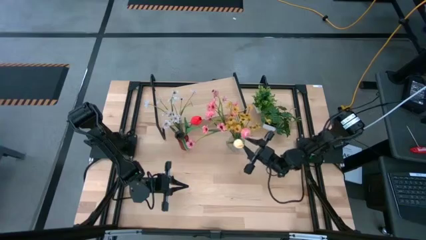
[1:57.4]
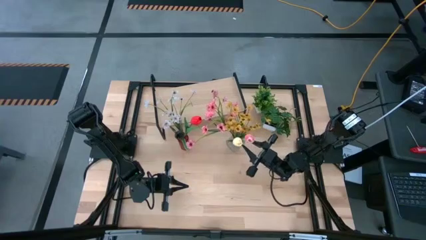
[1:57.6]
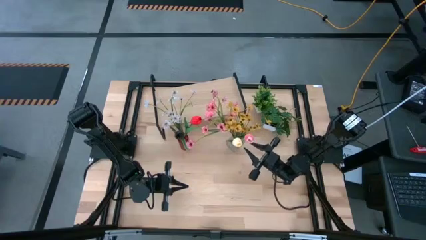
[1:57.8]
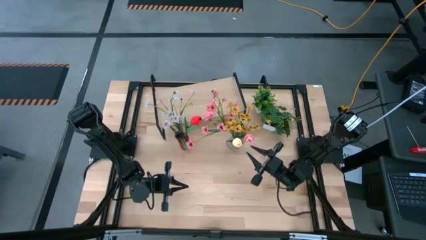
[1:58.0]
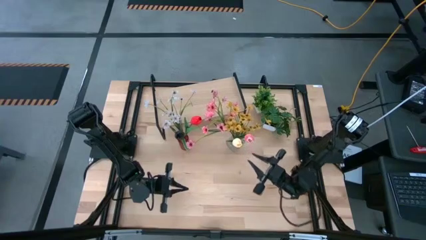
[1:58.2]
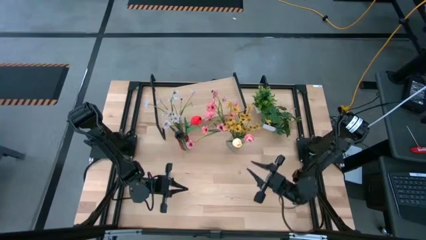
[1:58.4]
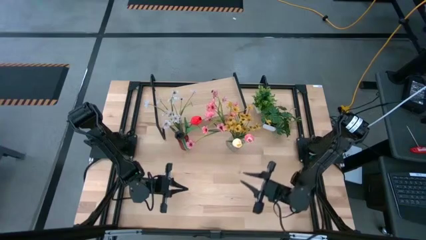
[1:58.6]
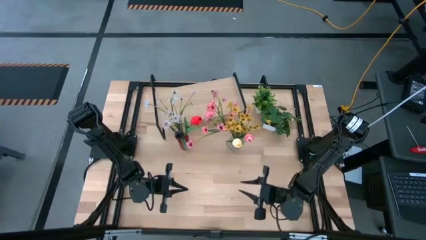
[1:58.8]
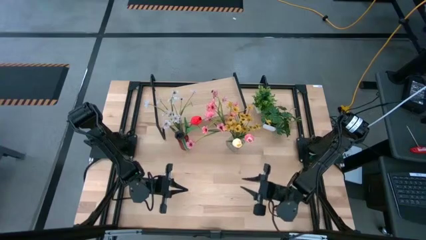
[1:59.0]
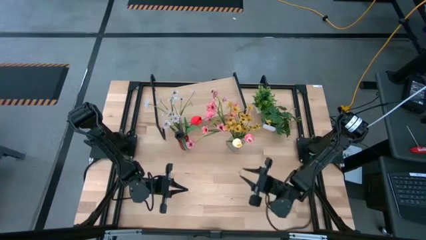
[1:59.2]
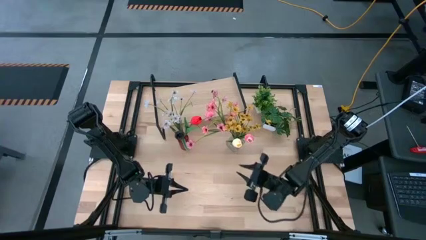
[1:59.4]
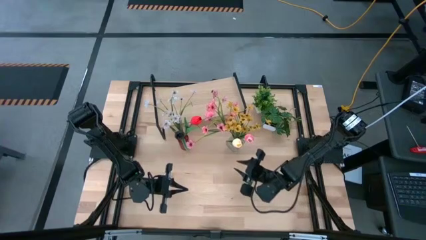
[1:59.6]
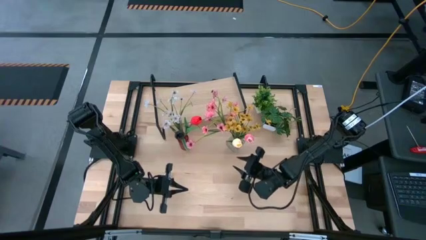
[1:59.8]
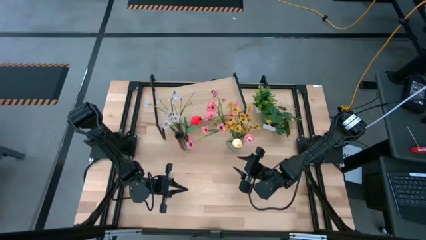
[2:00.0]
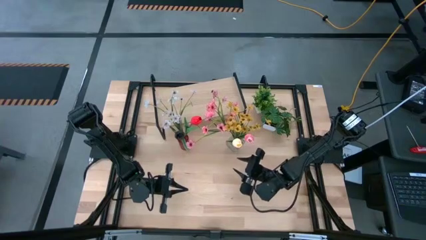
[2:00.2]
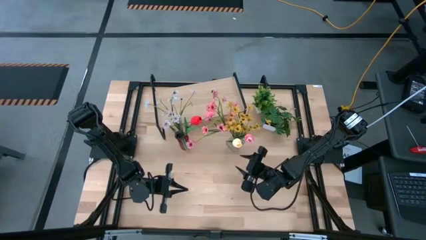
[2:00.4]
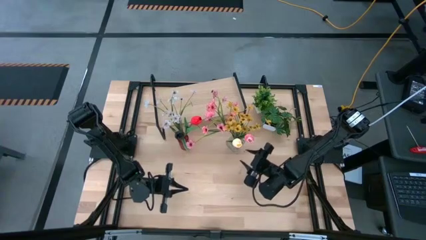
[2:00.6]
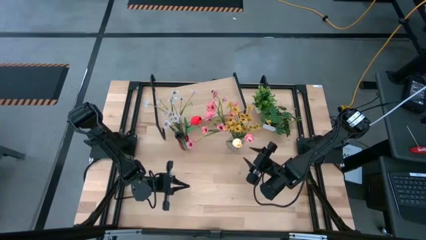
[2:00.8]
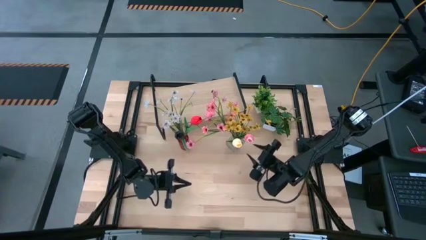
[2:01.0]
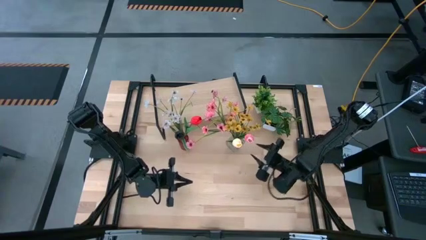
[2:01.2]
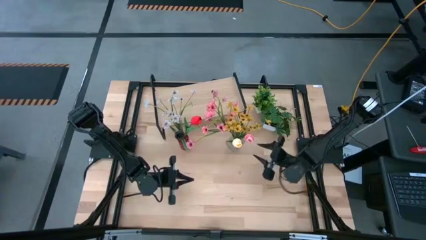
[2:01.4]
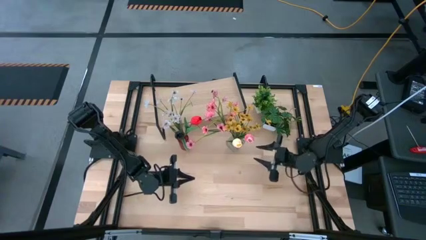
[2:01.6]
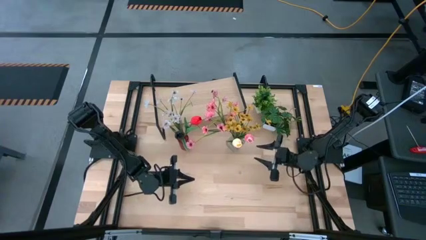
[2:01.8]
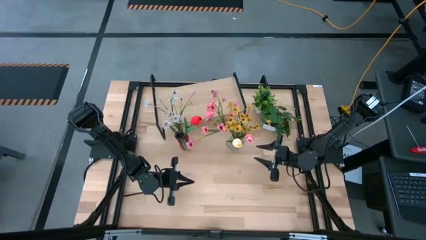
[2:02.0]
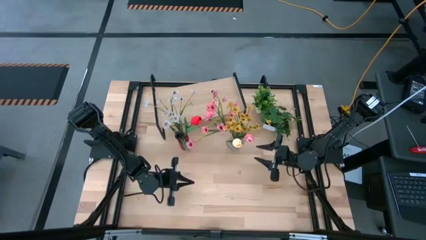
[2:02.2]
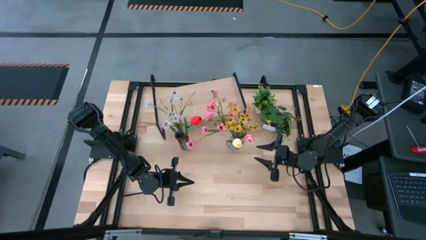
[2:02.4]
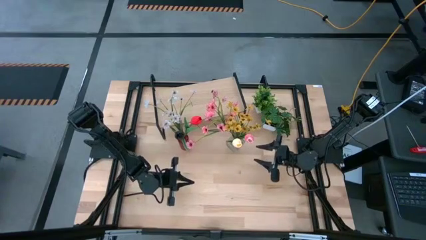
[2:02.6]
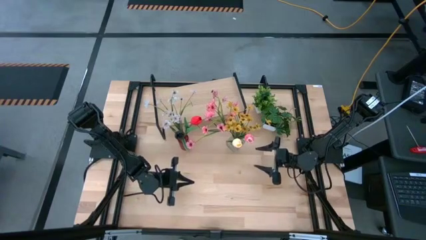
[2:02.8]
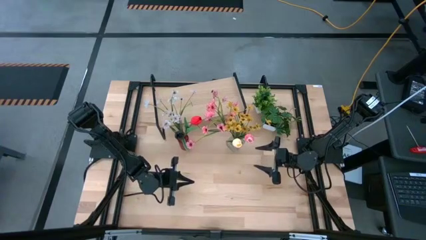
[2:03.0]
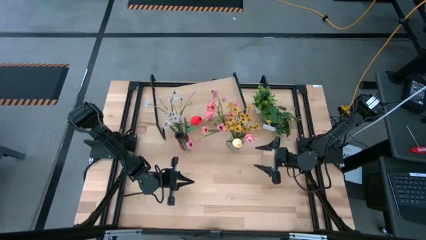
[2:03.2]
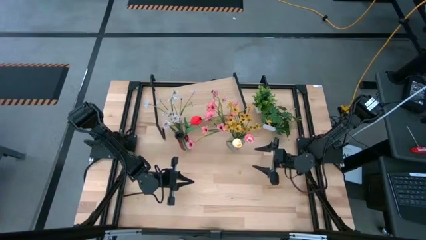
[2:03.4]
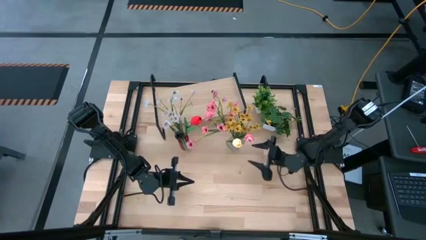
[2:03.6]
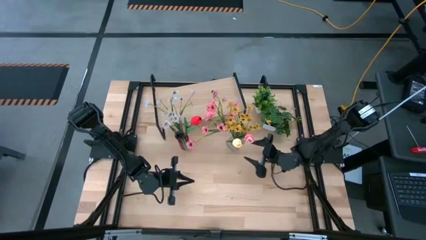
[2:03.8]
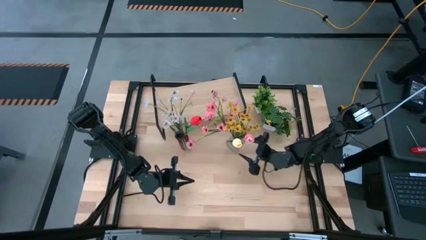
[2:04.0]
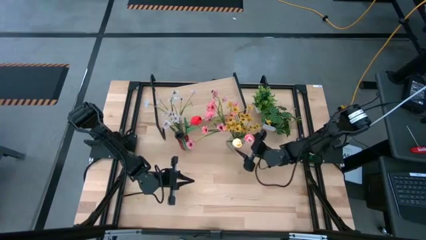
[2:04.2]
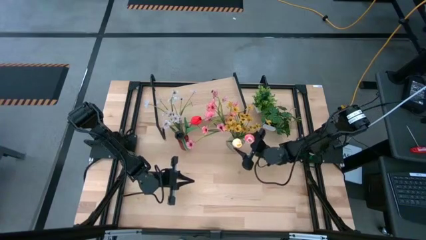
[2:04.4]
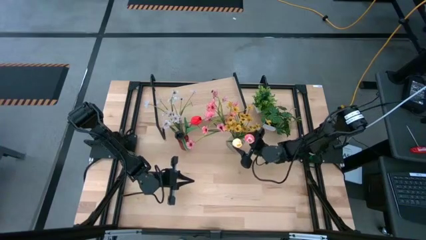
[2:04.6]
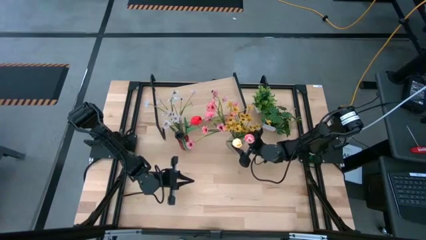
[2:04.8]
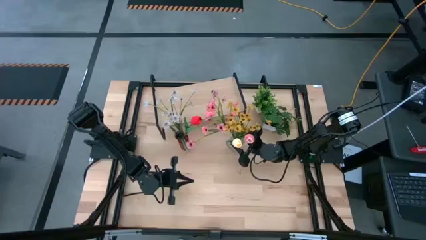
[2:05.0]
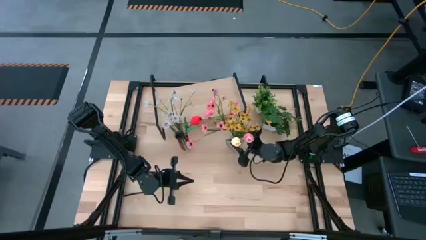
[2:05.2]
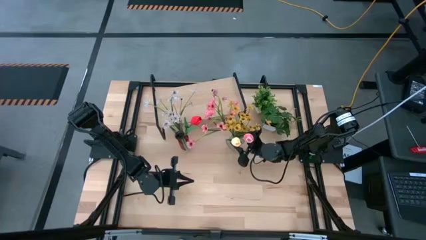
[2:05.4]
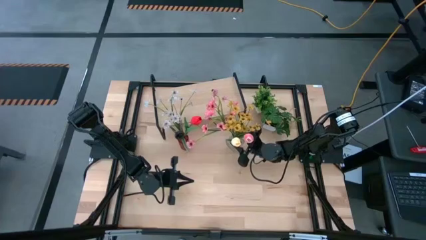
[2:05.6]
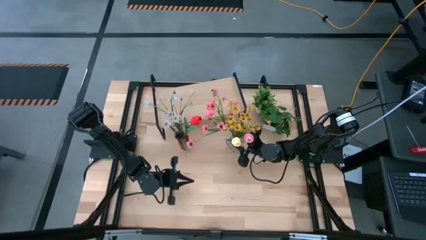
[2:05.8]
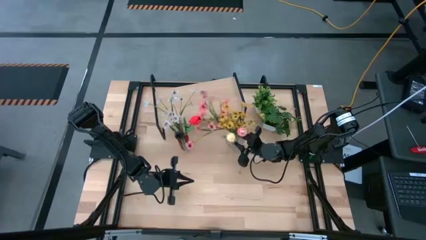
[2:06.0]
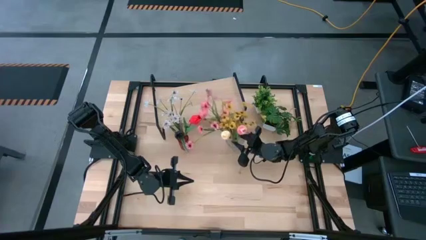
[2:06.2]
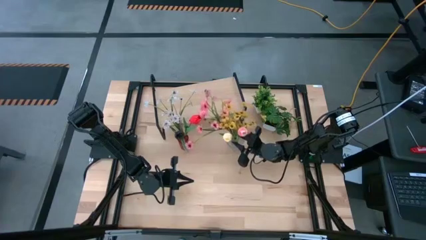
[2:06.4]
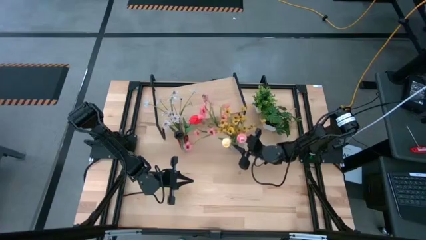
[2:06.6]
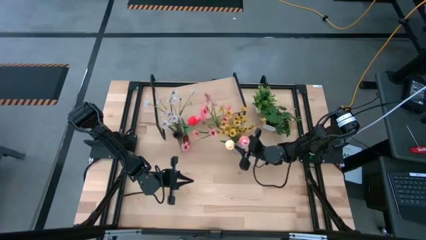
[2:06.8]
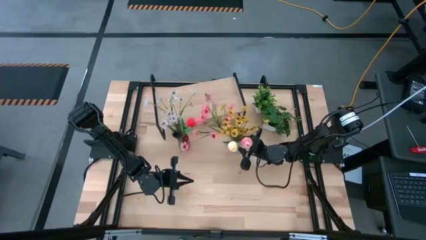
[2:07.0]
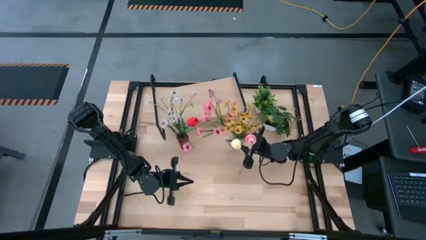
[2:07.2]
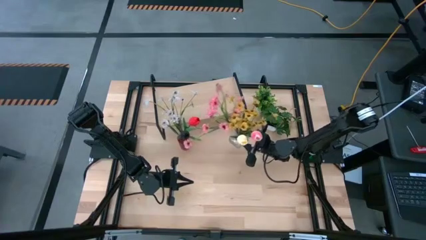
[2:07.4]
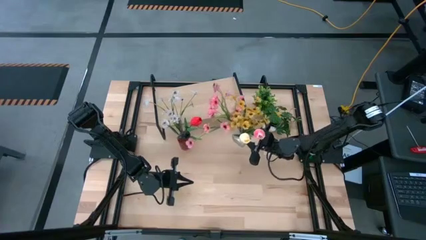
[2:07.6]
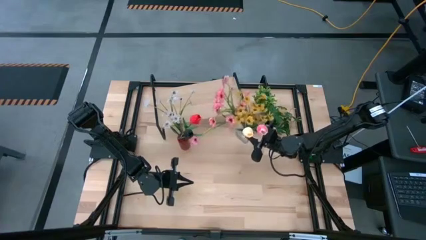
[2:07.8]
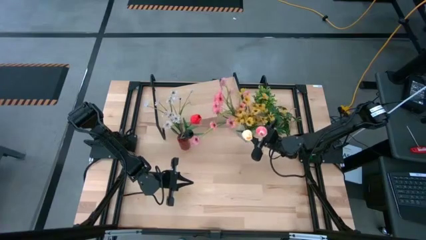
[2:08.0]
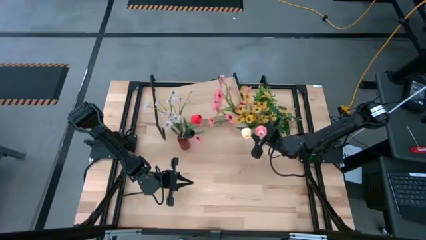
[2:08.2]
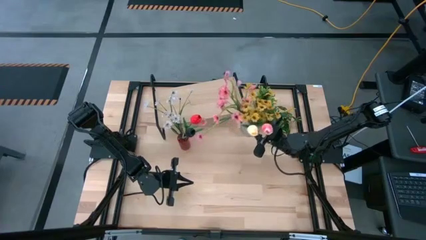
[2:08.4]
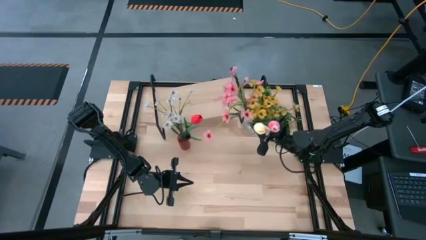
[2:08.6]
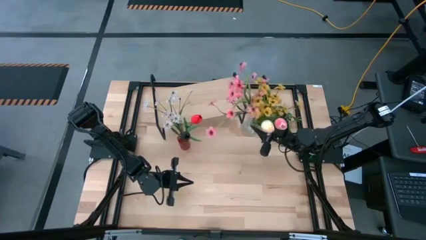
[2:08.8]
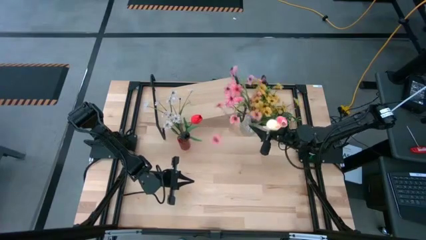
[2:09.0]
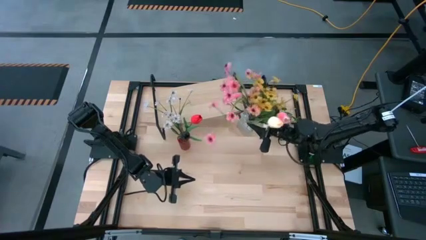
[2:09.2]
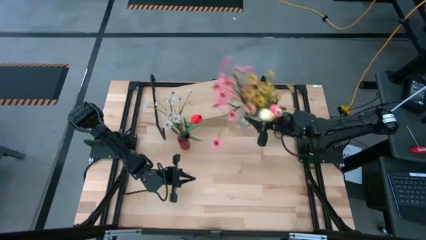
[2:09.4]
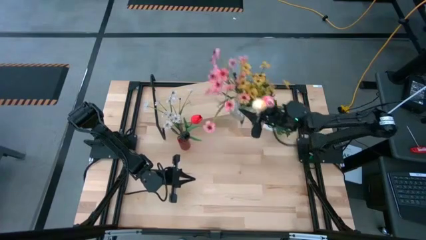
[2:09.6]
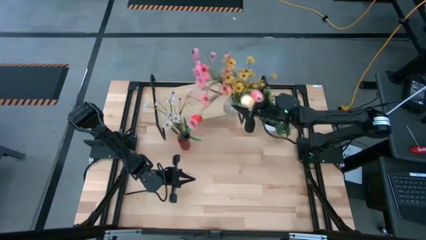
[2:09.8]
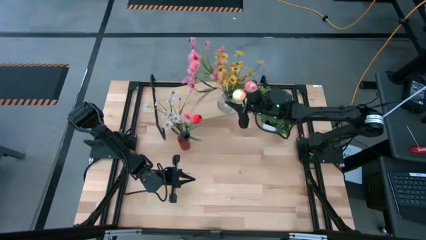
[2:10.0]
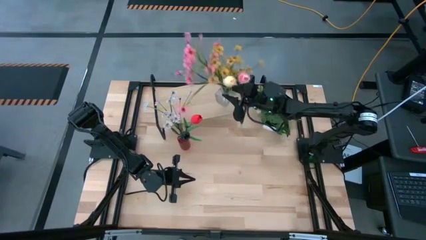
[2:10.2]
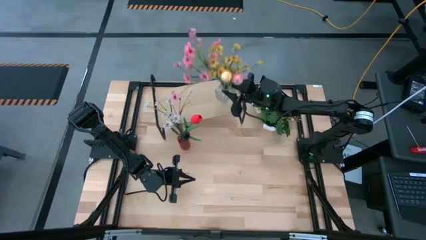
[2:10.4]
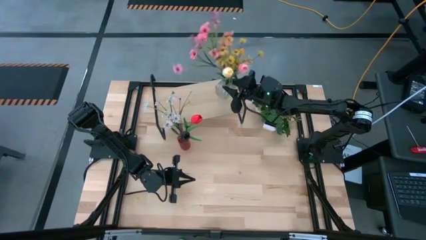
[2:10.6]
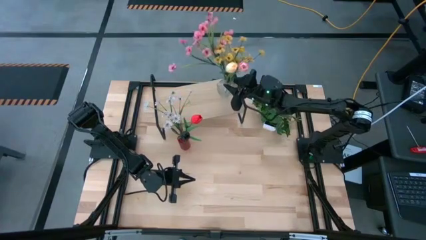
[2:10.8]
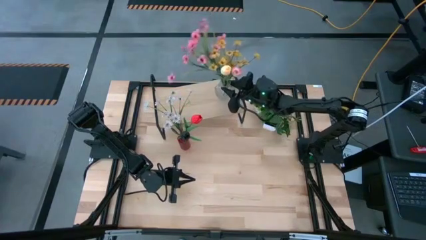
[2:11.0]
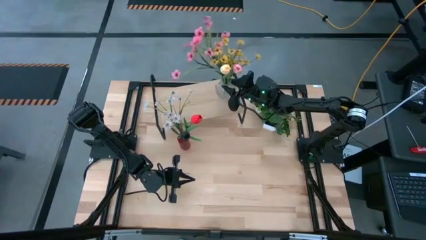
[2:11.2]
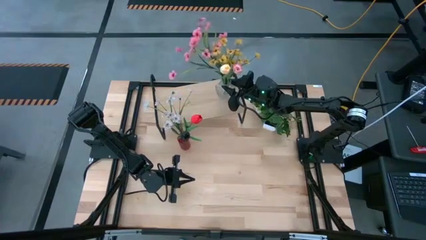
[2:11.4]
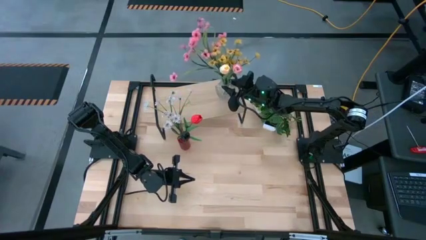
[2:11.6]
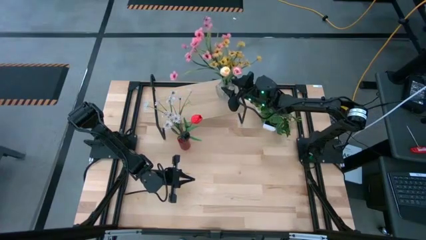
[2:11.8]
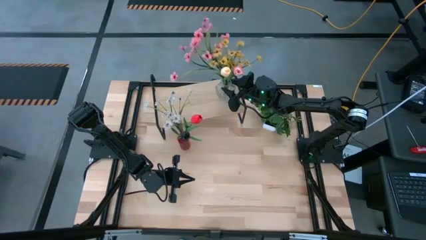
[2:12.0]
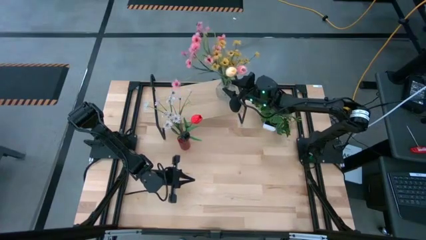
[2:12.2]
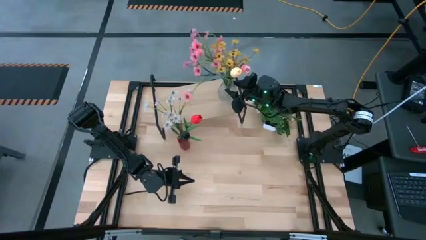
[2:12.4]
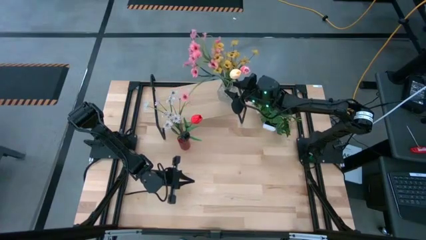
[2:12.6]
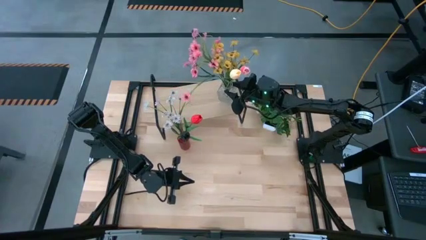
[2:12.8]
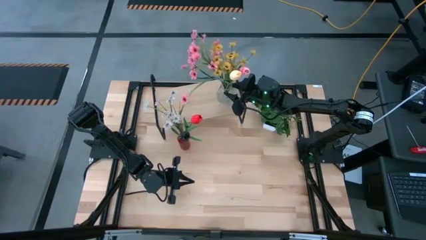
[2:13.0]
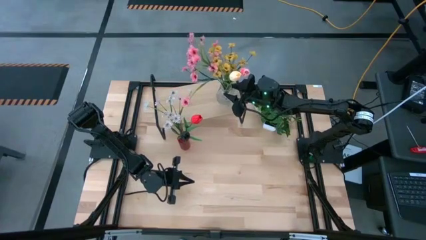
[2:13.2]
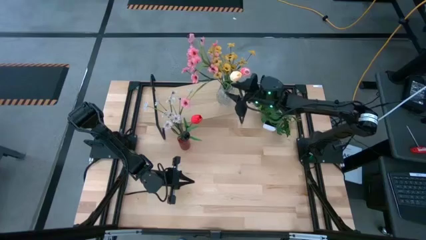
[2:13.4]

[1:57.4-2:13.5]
Task: Pick and place flowers into a vace then onto a shelf
Put the transparent flower vase on the shelf
